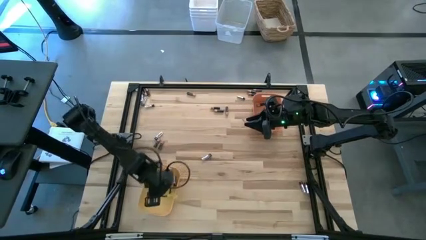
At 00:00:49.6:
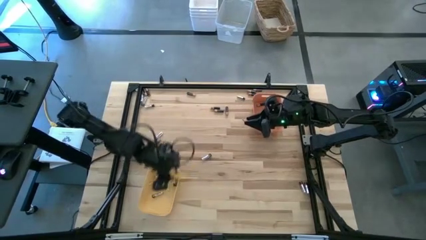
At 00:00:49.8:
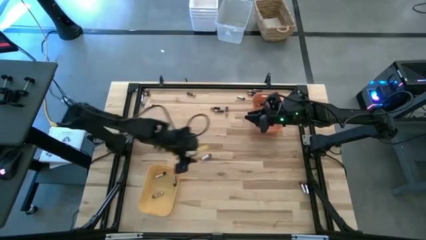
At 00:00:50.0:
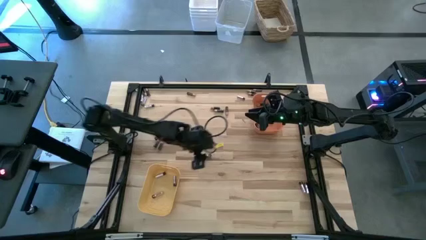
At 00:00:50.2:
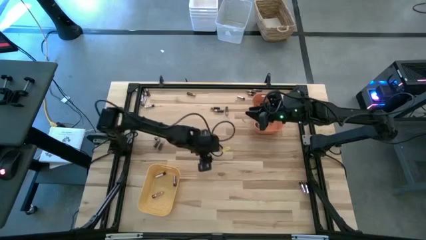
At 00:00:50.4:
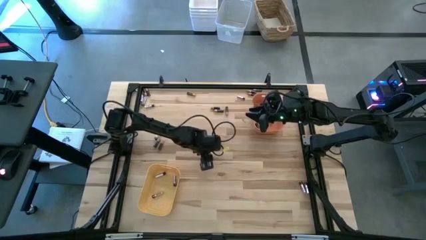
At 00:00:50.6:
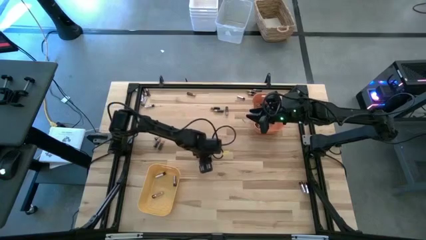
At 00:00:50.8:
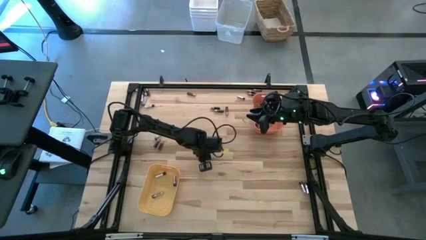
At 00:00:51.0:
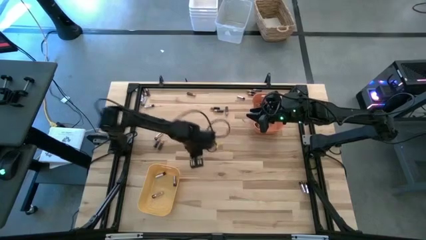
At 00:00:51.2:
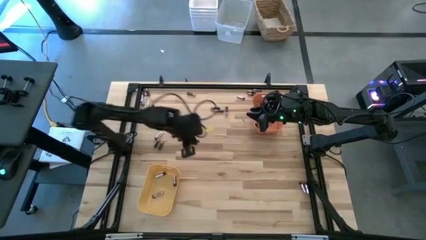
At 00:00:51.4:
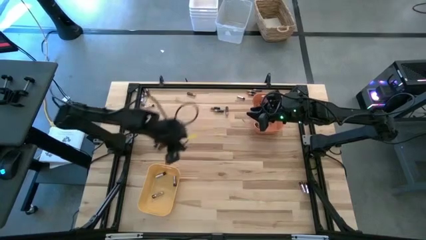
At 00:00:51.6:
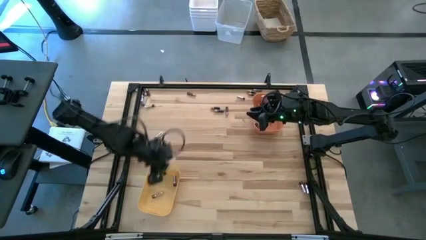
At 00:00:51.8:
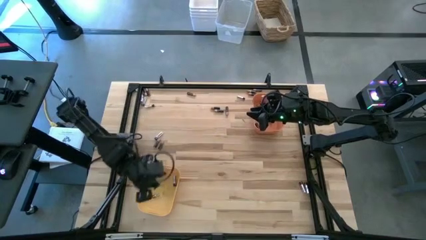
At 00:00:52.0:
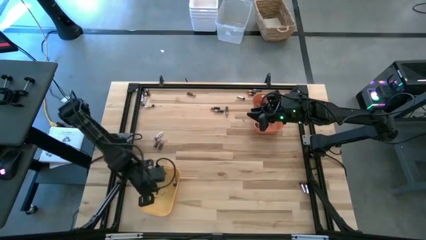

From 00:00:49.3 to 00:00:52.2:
Task: Sort batteries
Put the silver battery into the yellow bin

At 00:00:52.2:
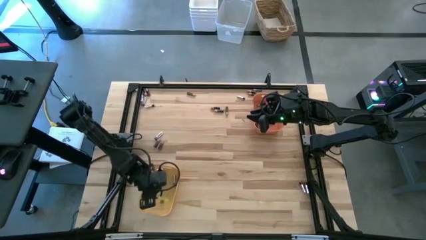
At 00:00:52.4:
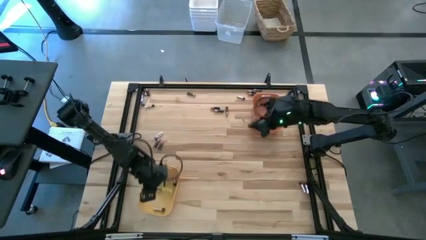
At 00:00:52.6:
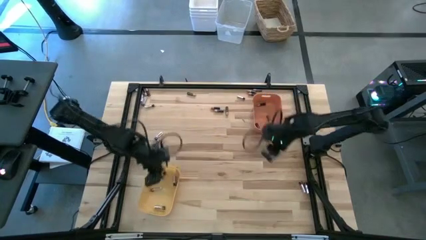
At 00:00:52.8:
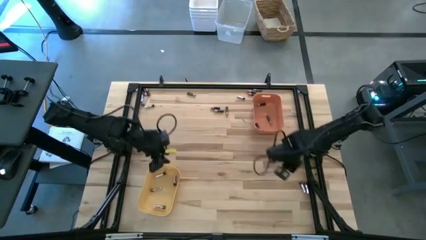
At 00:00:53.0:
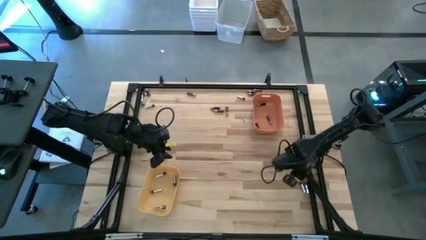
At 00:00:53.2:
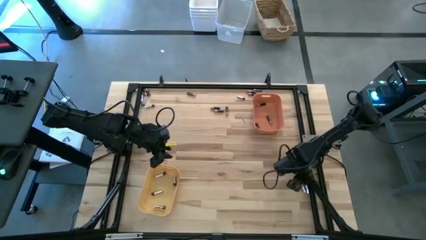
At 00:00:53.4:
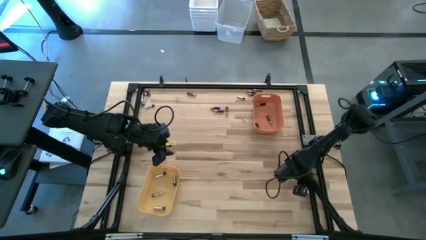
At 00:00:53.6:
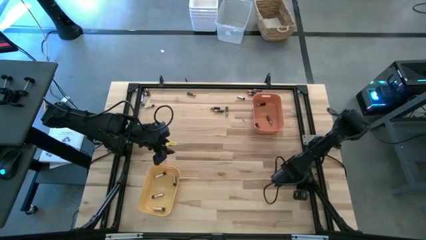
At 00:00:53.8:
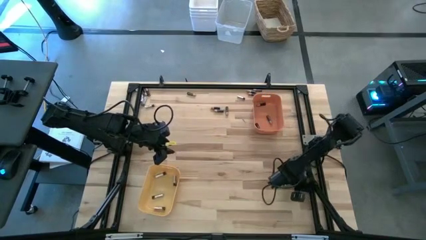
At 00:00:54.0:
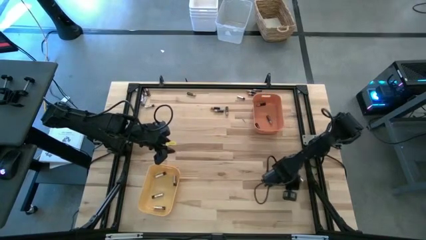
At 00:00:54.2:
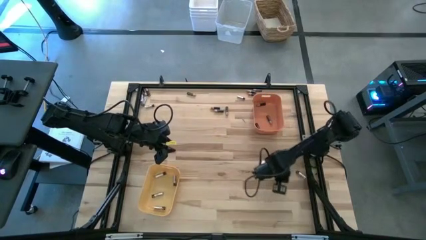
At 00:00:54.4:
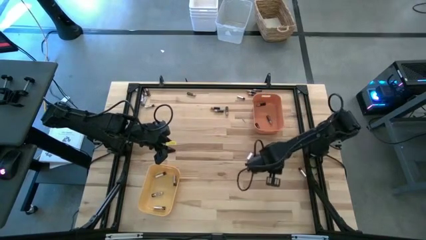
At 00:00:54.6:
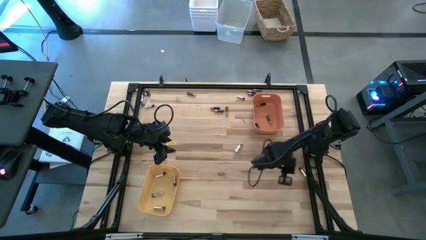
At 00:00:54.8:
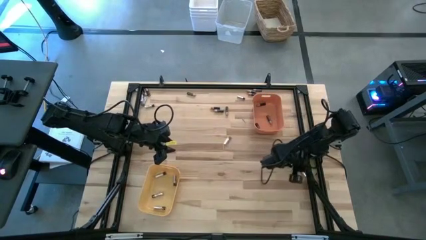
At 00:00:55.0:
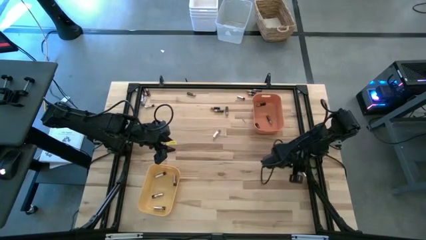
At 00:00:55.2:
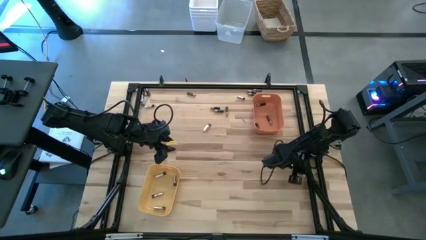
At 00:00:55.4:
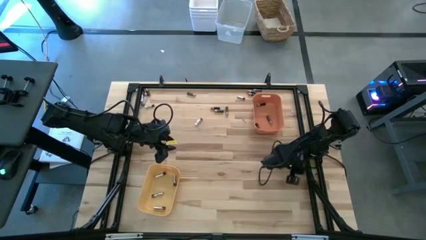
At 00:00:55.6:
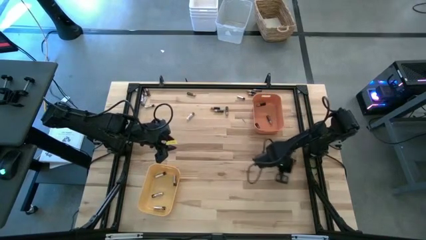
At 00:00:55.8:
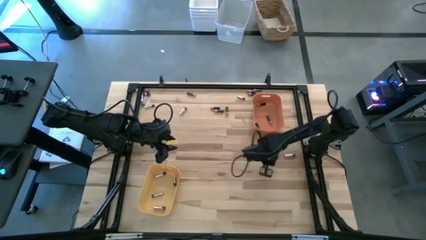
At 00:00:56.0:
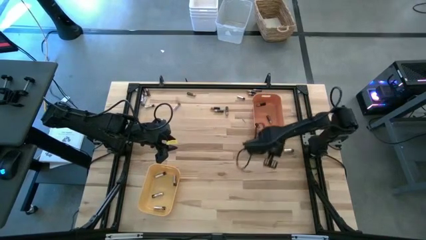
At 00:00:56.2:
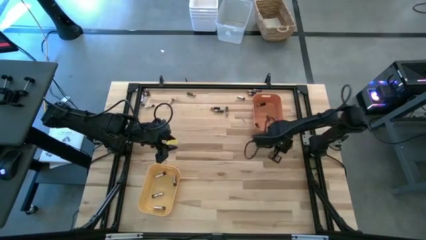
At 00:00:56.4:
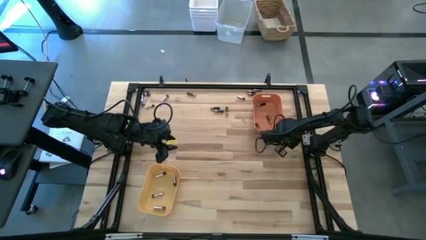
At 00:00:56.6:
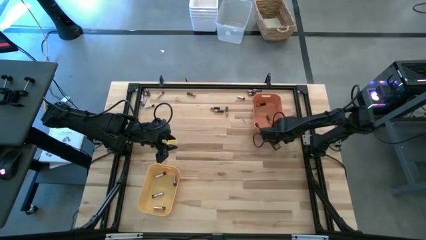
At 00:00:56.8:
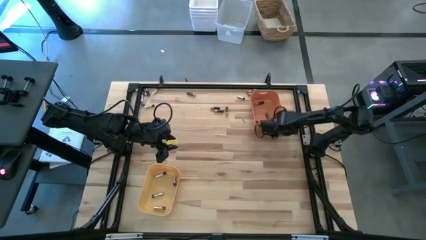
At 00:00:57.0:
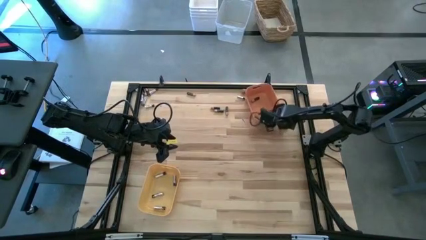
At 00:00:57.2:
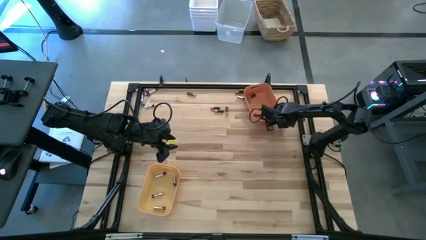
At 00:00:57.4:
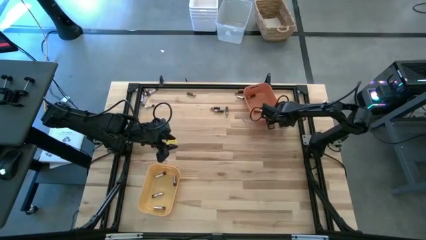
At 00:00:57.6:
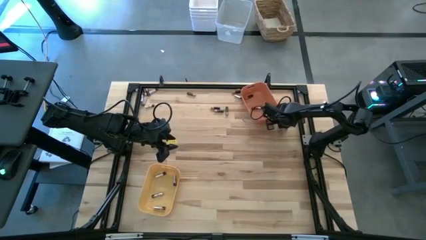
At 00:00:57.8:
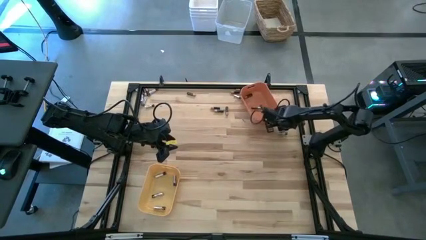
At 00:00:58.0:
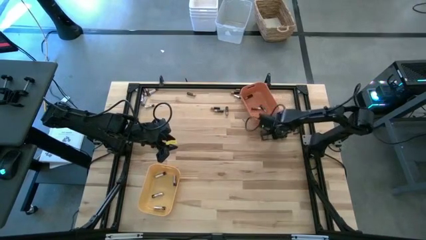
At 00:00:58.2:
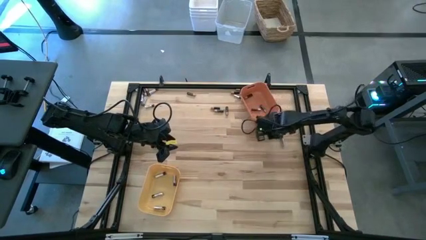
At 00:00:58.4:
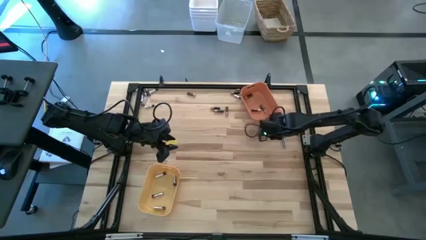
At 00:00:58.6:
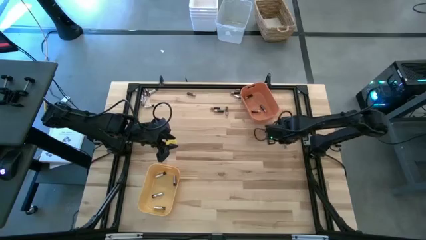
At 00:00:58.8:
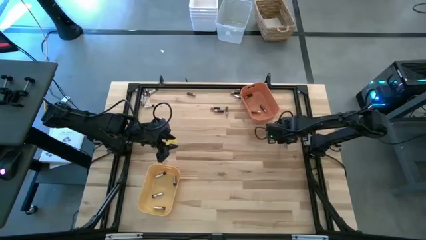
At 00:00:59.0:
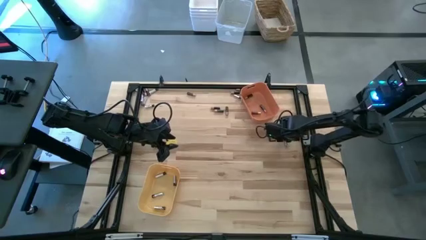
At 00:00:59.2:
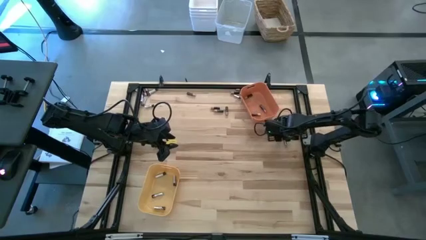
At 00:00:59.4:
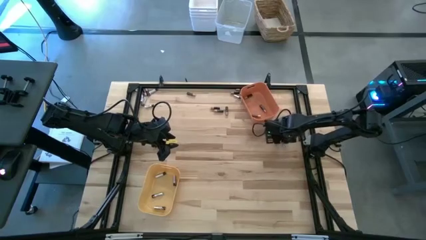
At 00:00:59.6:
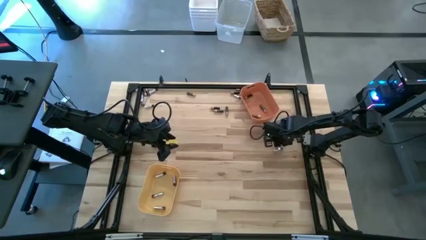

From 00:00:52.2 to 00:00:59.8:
Put the silver battery into the yellow bin

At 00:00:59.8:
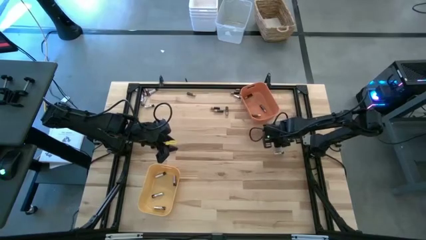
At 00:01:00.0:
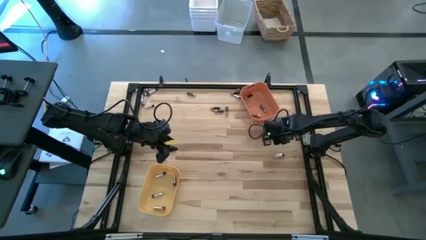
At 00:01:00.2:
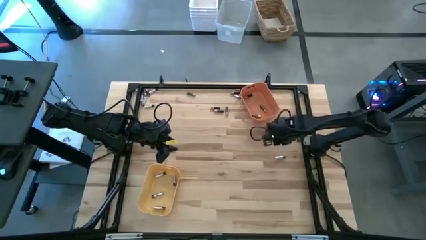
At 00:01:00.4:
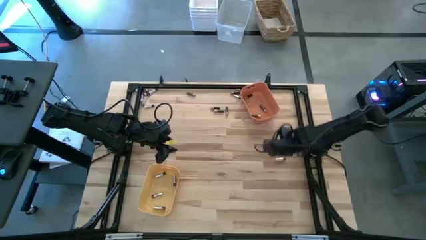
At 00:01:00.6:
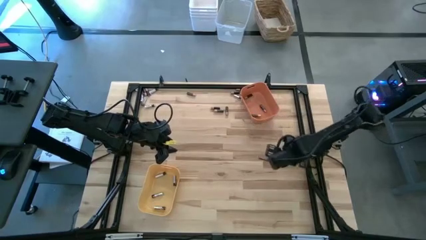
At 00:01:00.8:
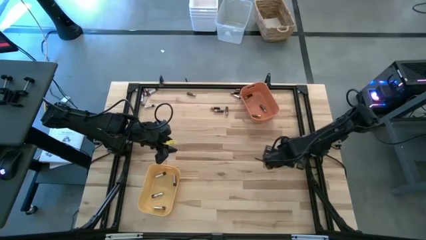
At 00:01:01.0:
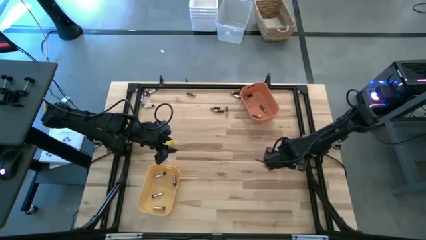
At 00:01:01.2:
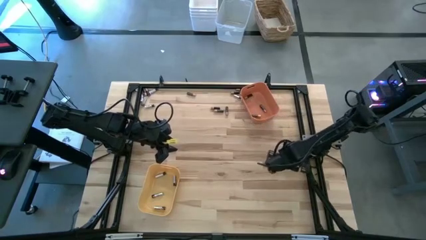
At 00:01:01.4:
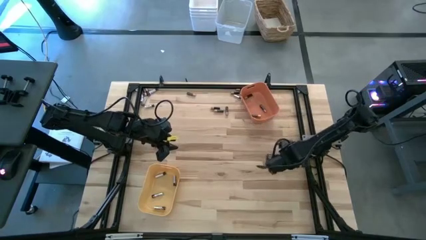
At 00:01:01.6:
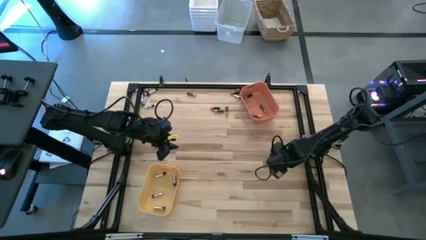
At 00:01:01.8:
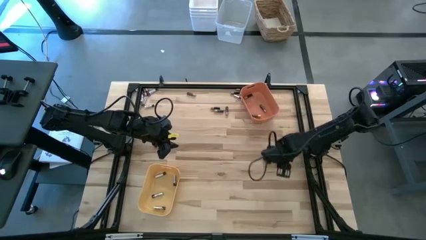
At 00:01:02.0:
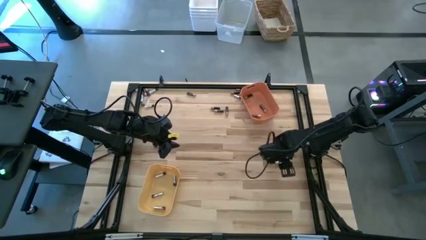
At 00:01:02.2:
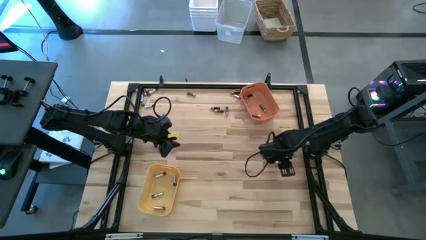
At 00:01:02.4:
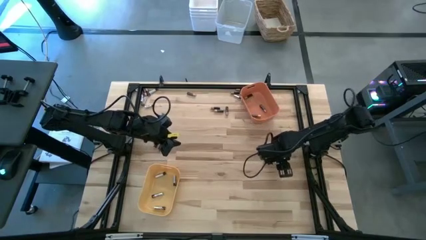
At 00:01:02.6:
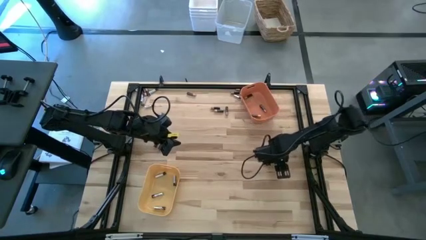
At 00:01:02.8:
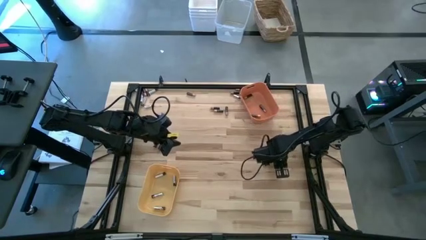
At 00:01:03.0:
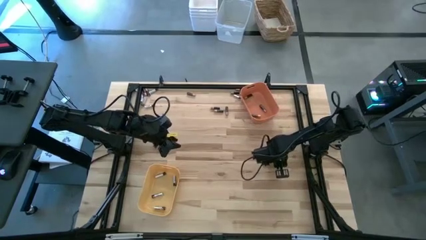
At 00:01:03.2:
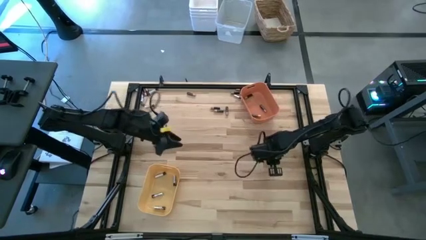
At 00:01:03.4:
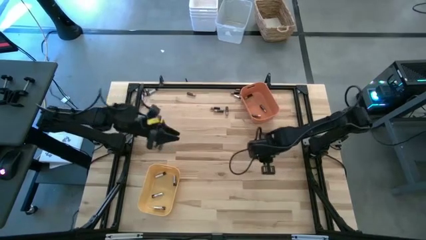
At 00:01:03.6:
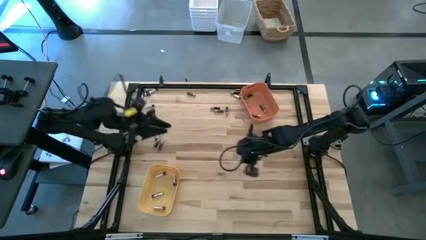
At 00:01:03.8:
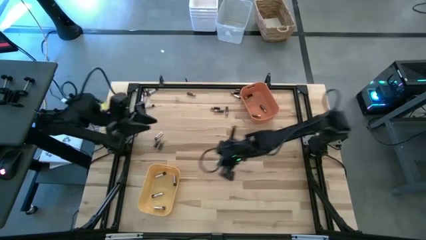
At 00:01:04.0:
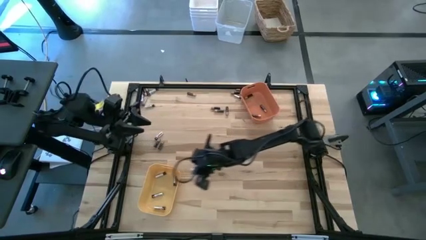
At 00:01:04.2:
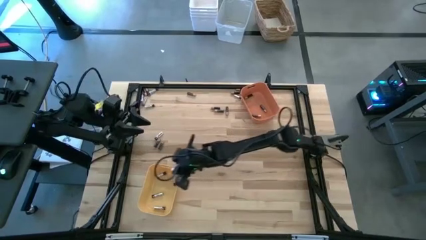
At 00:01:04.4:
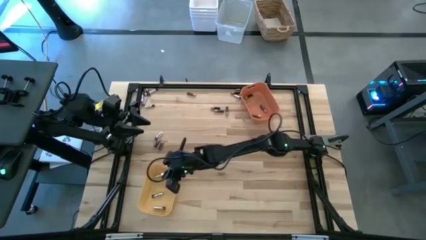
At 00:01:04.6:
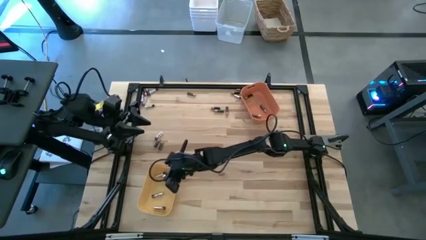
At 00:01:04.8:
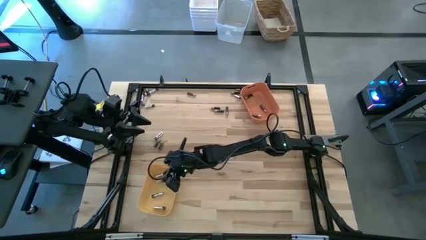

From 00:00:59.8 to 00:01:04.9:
Put the silver battery into the yellow bin
